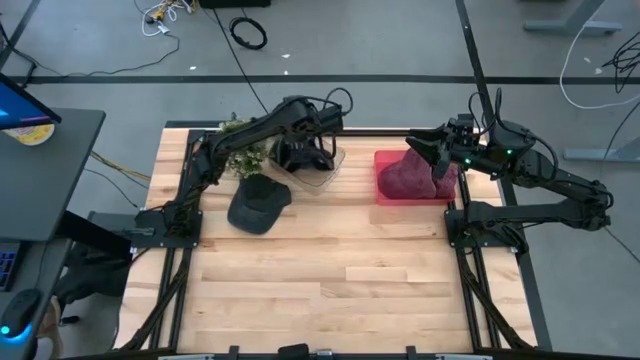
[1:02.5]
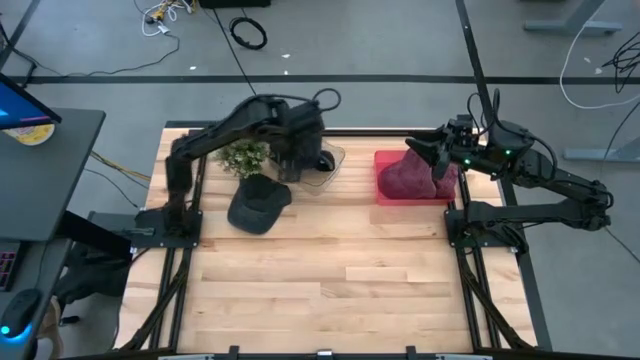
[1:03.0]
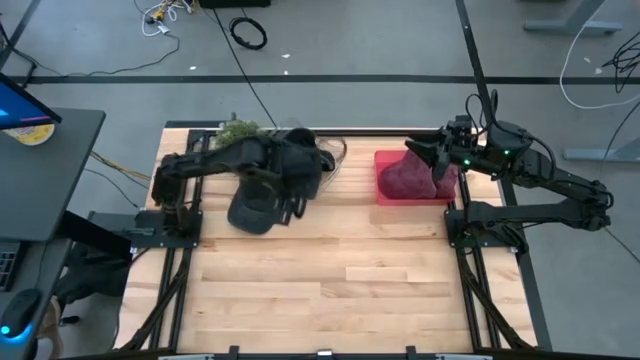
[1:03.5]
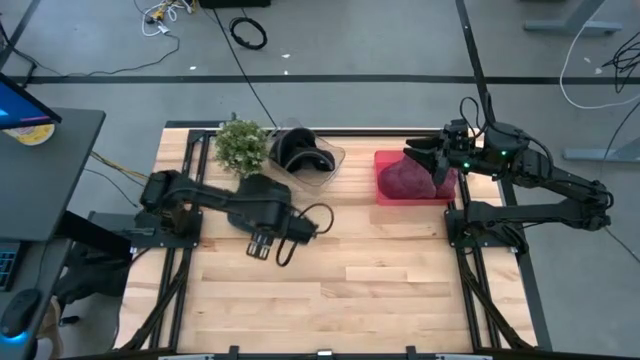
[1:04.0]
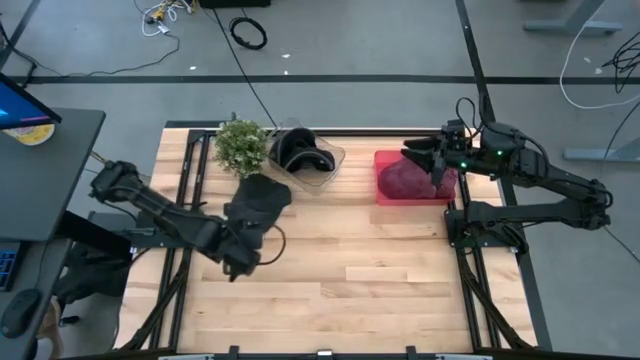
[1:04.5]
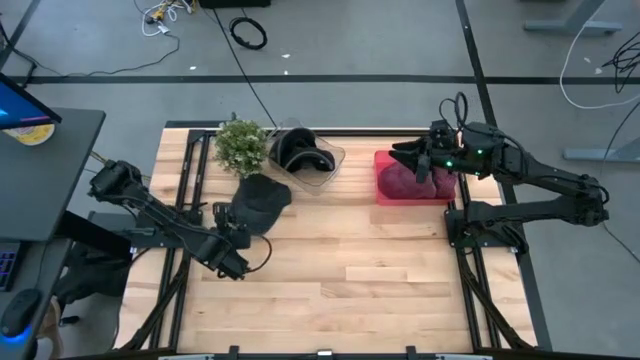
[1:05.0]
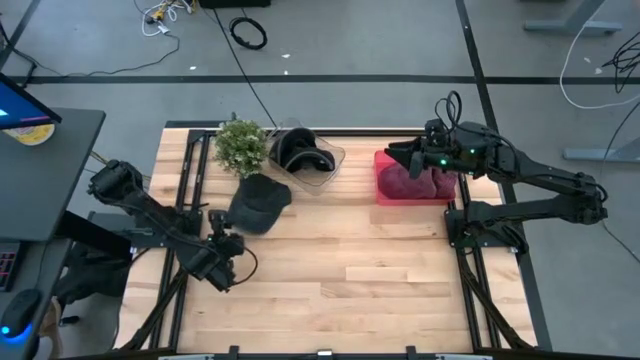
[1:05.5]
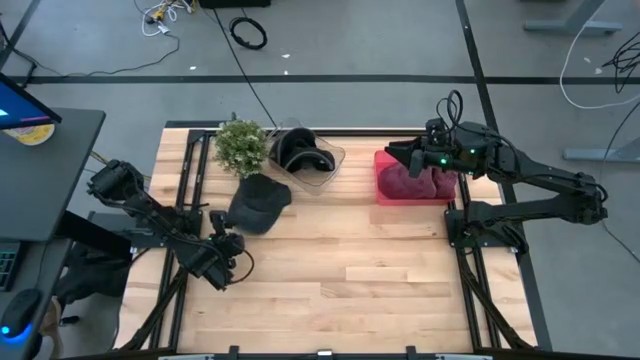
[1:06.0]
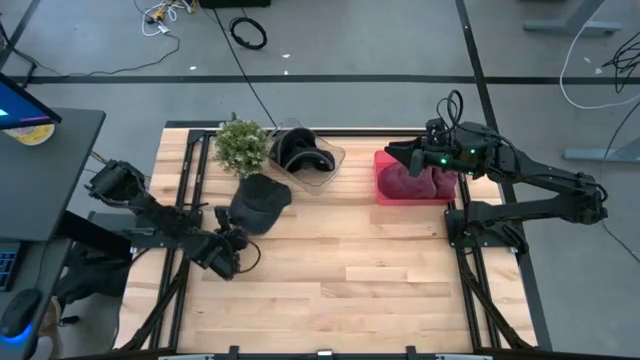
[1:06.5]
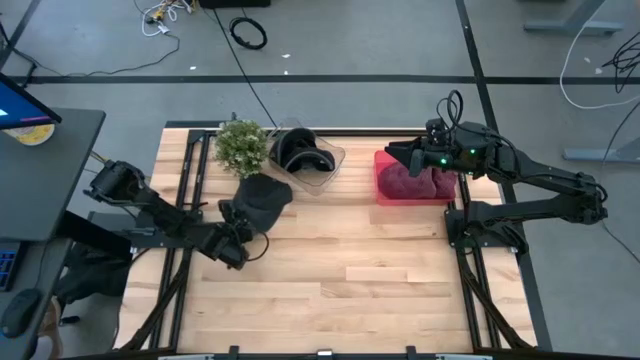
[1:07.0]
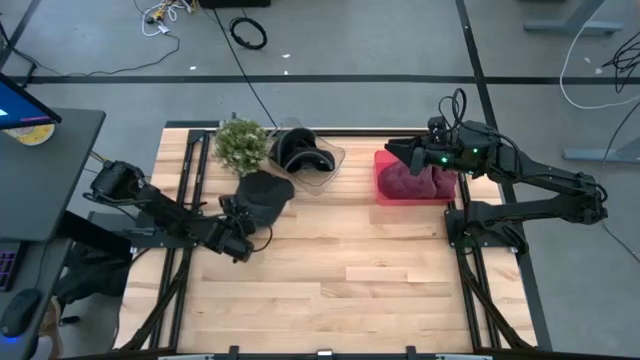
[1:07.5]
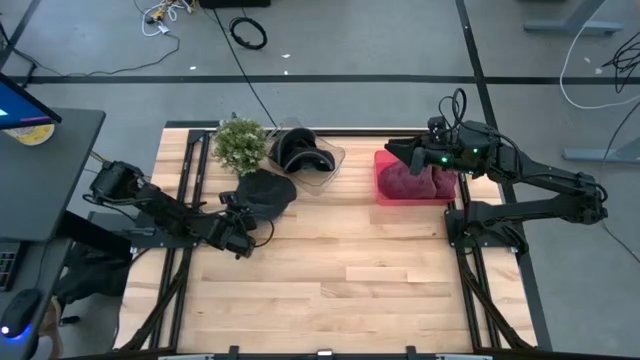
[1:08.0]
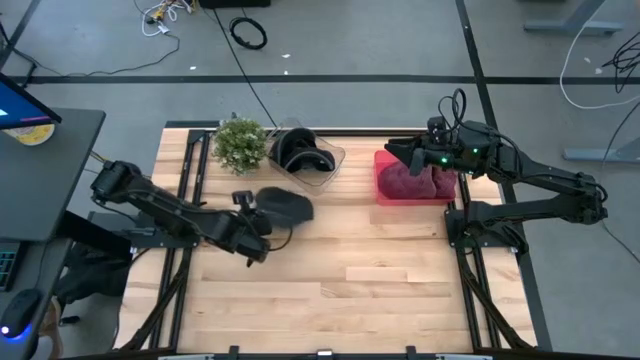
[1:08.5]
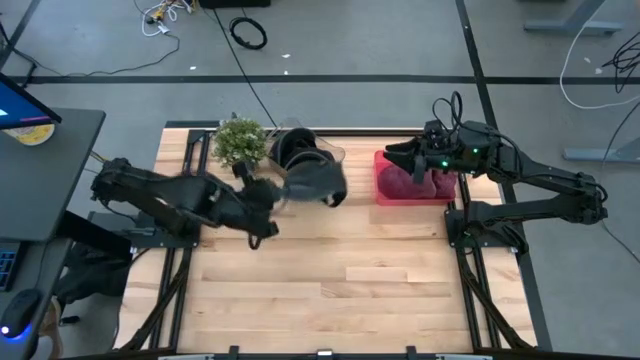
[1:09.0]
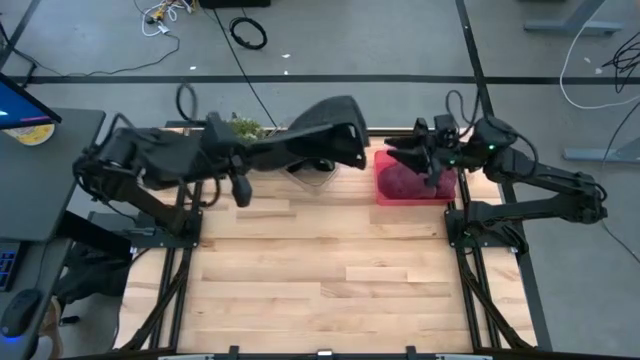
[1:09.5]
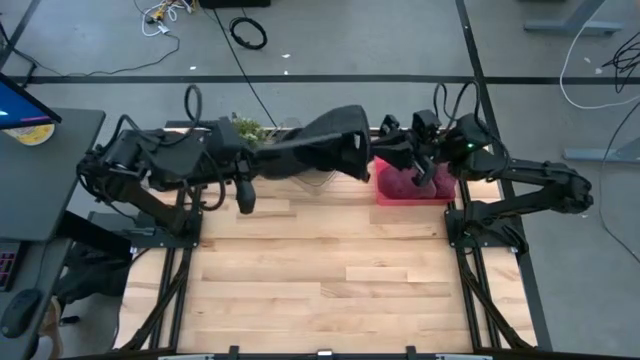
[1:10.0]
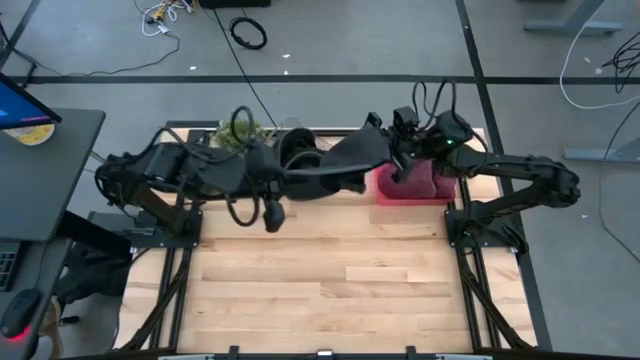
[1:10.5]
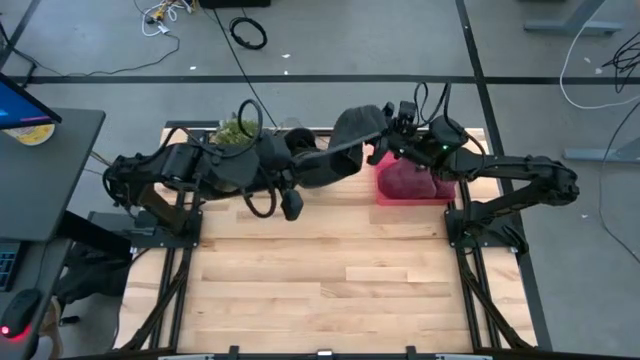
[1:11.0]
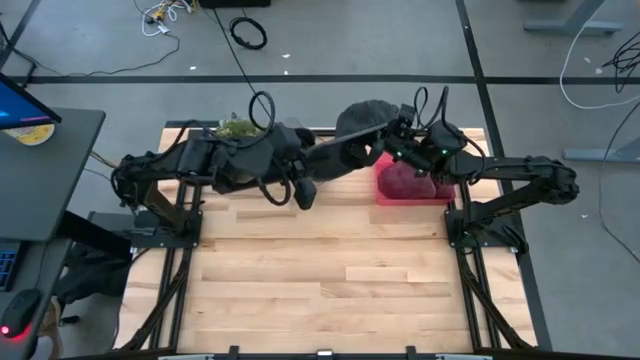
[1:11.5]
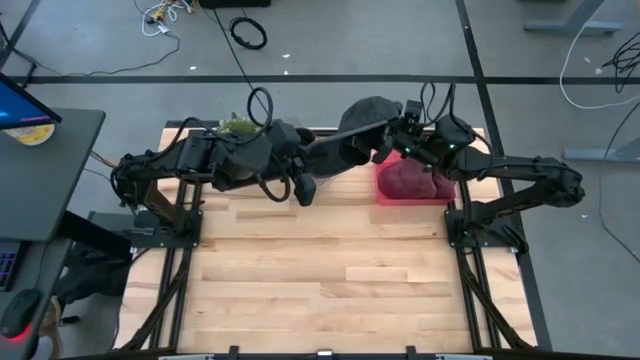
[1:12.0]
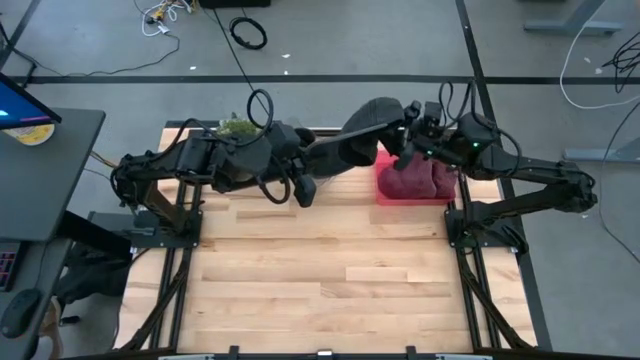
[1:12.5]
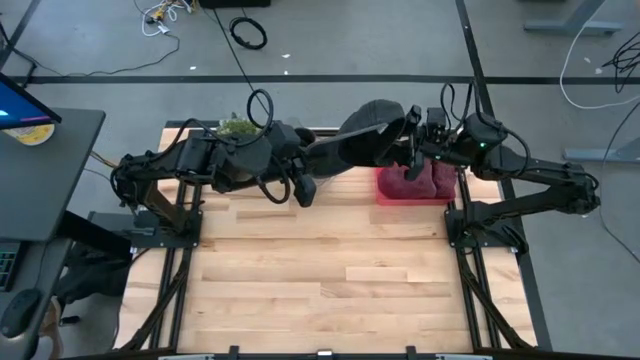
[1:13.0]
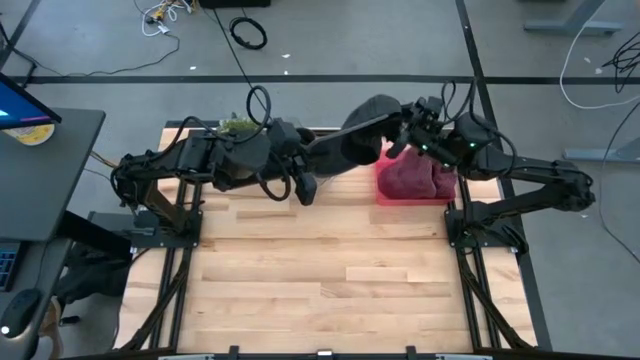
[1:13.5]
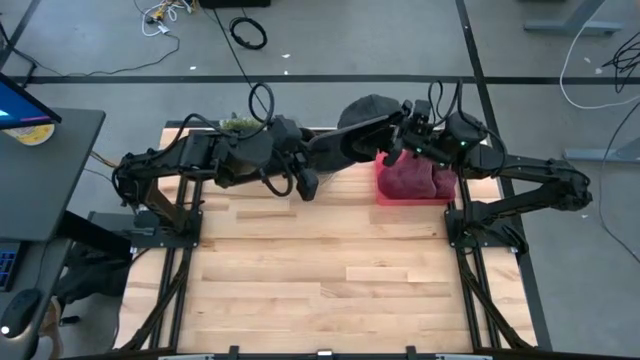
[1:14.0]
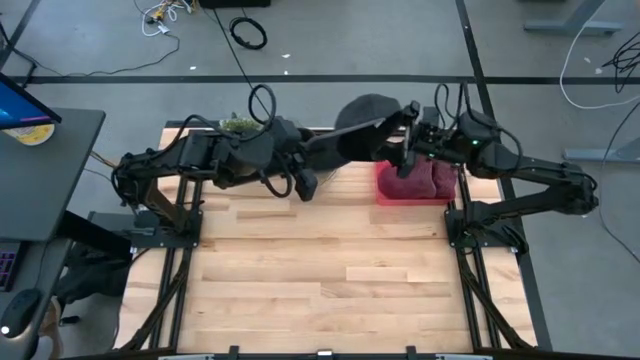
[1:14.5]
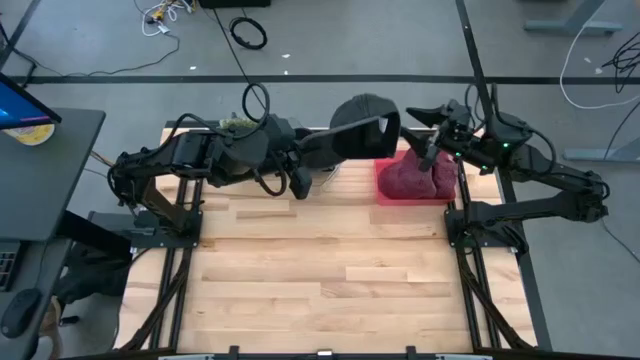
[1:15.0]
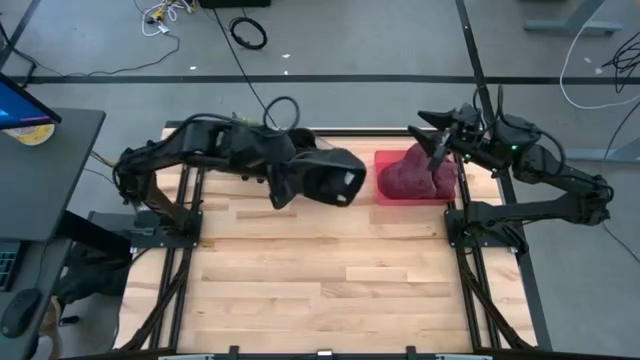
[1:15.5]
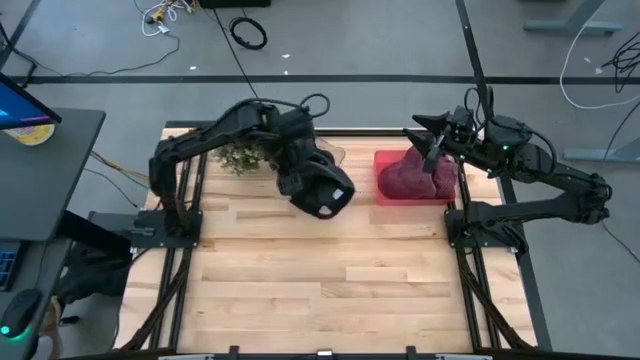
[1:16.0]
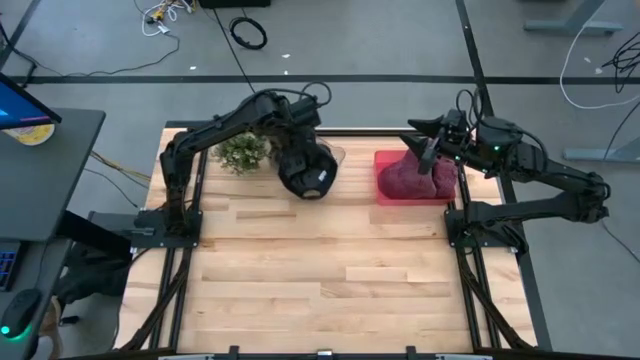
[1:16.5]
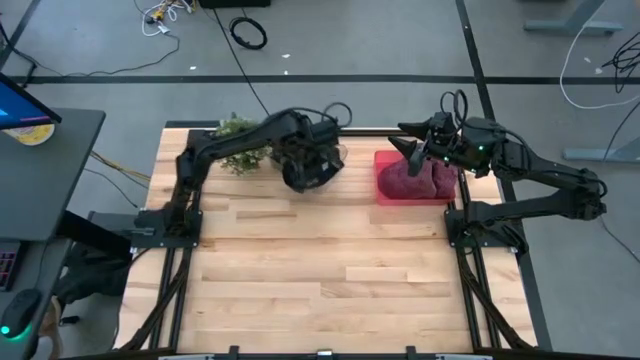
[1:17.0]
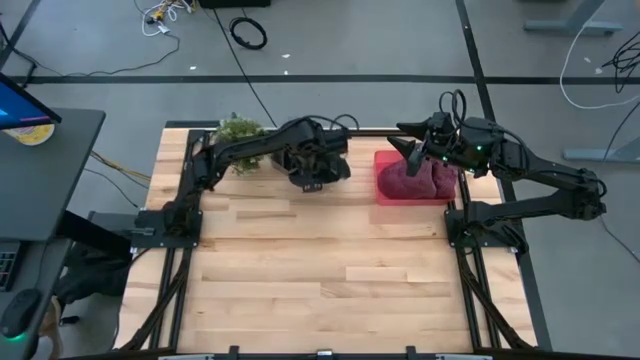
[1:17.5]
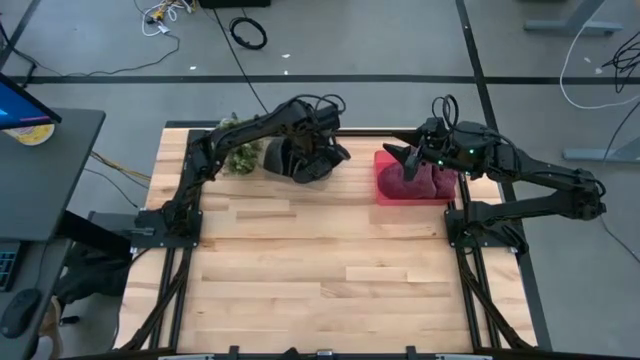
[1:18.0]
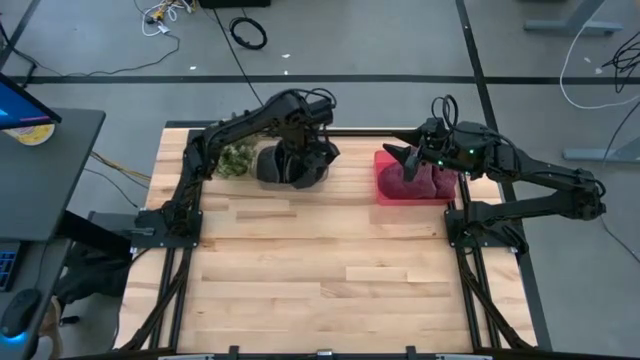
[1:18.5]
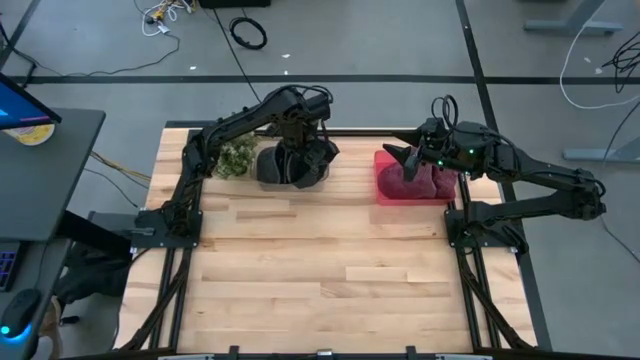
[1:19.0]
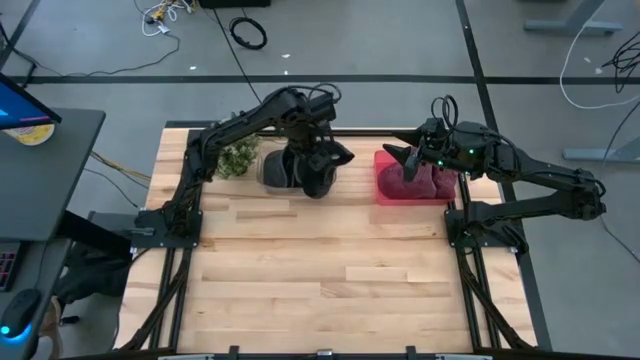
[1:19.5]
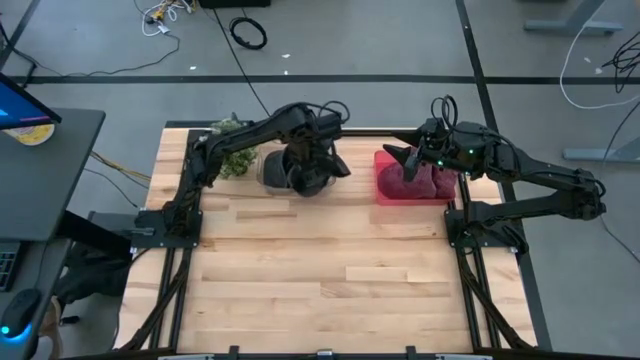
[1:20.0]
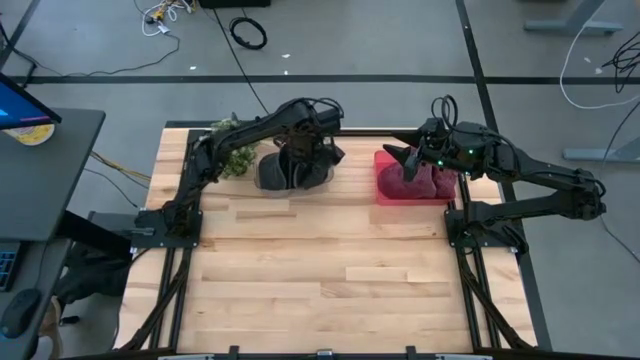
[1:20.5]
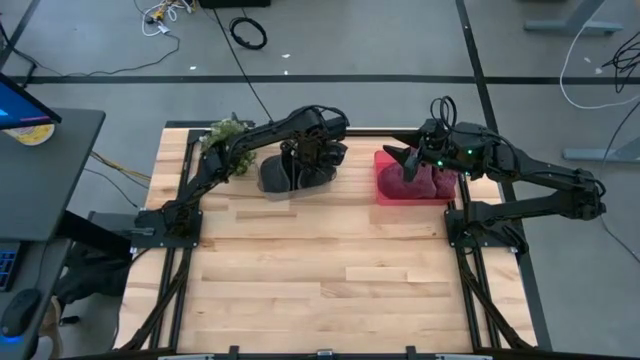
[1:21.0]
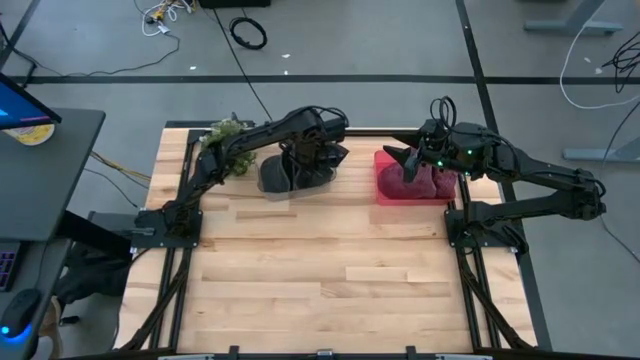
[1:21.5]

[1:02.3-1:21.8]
Task: Pick & Place hat
Put the black cap into the transparent bin
